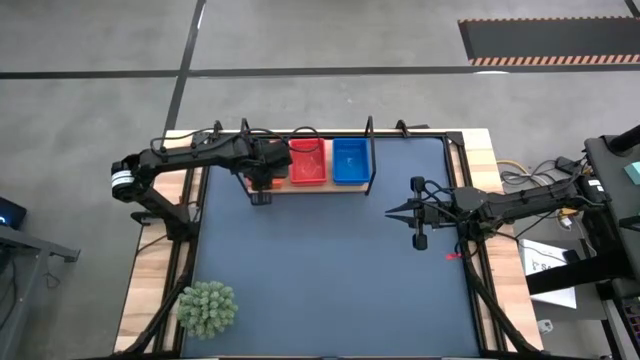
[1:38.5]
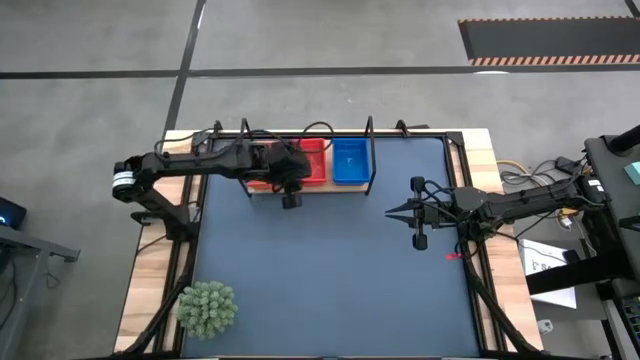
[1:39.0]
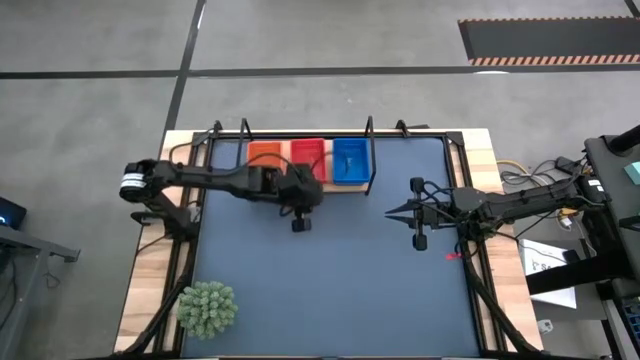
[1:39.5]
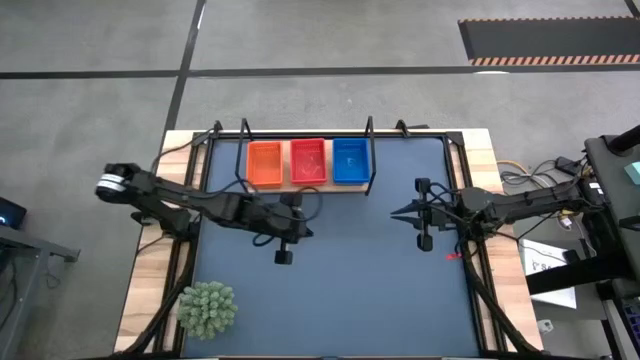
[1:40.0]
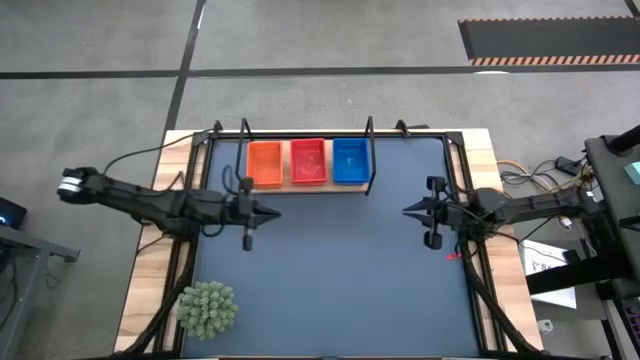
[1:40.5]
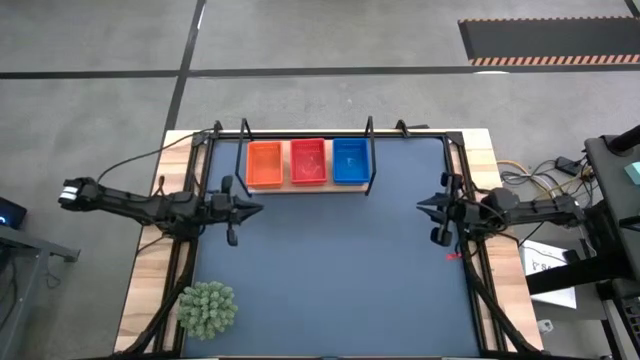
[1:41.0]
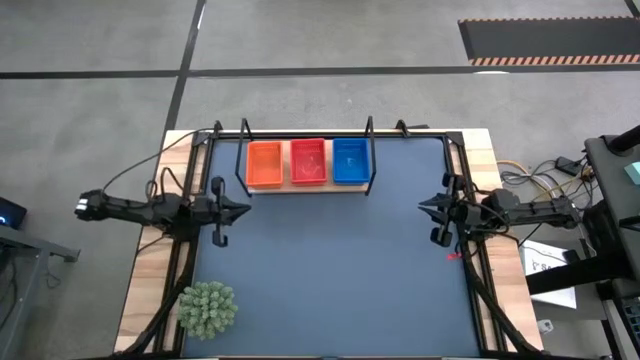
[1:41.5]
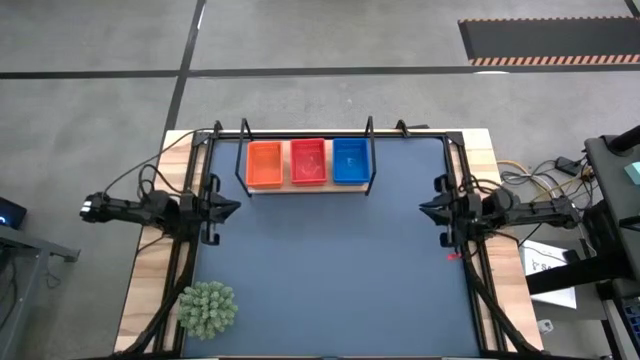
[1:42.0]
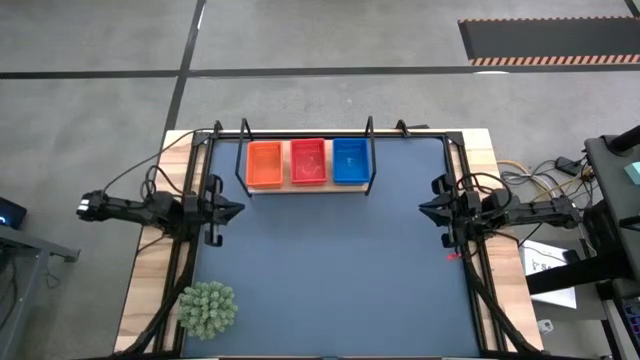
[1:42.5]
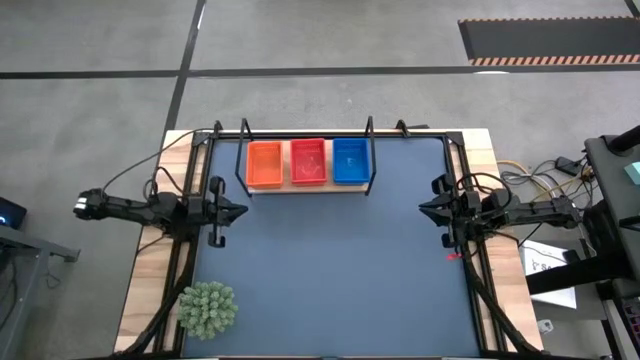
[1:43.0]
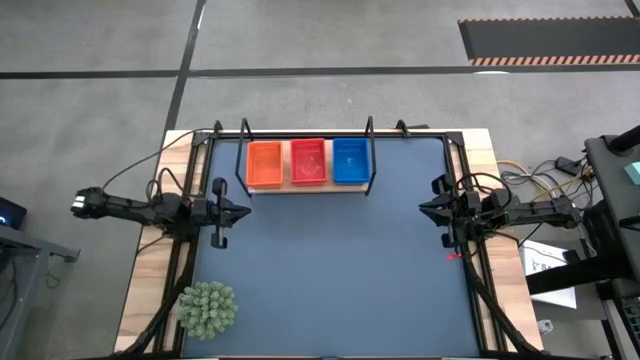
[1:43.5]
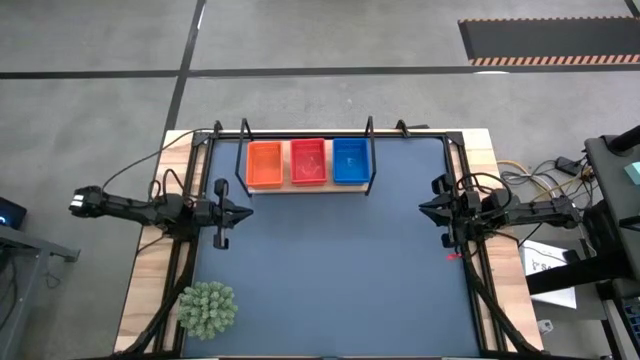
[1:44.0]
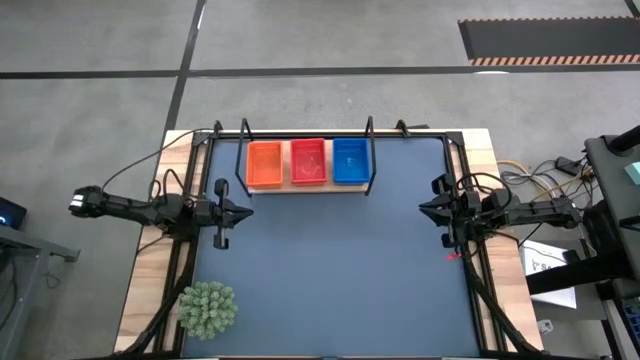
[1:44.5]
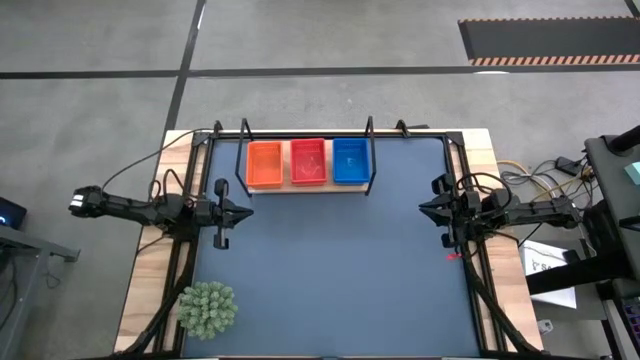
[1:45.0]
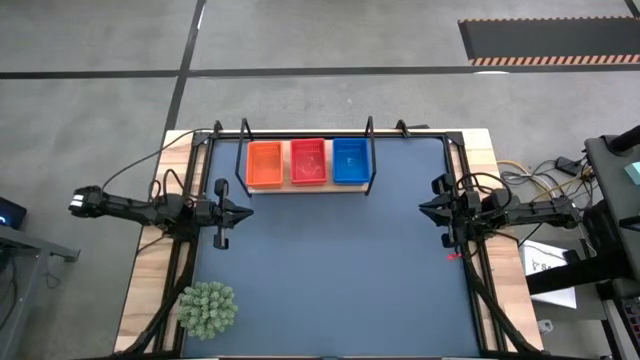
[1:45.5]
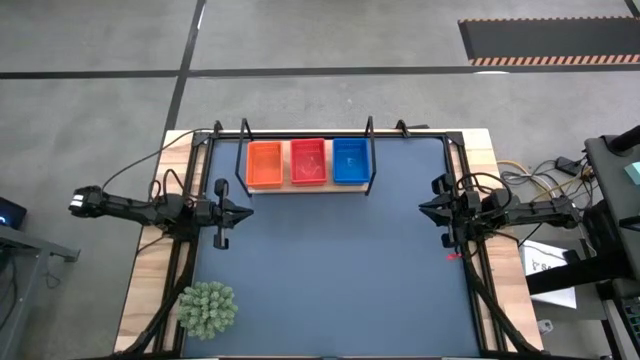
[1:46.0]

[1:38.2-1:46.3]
Task: Stack baskets on shelf by color
Return to Home Position

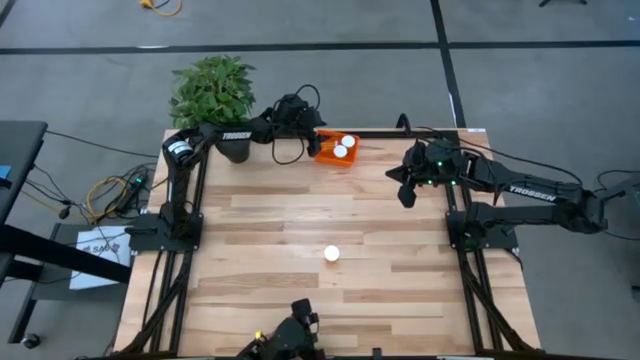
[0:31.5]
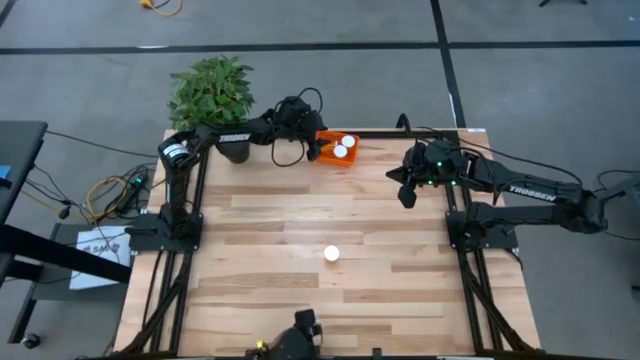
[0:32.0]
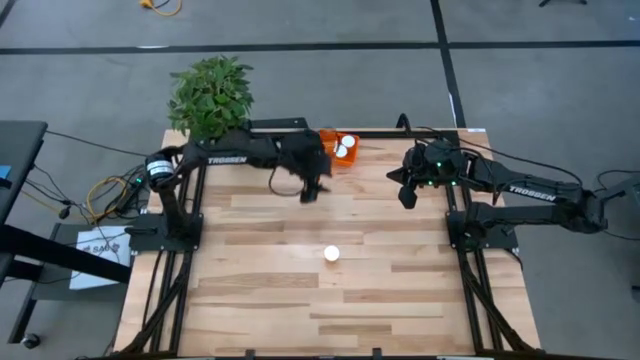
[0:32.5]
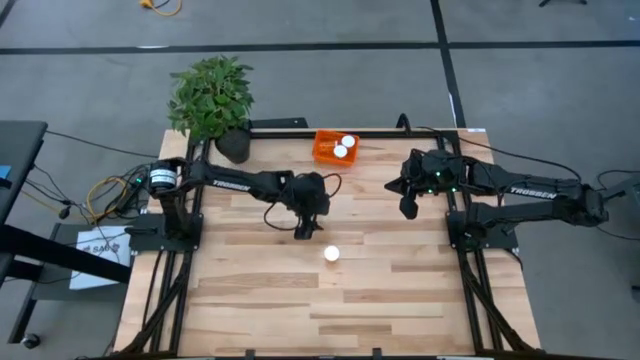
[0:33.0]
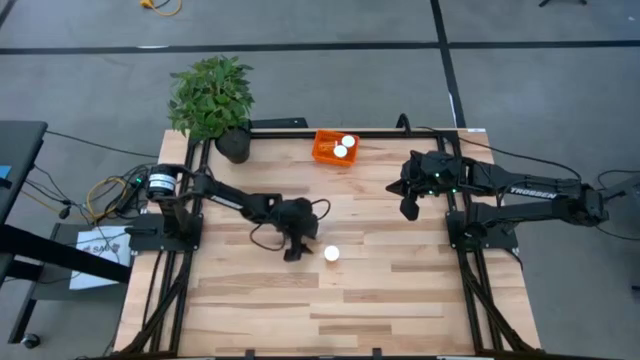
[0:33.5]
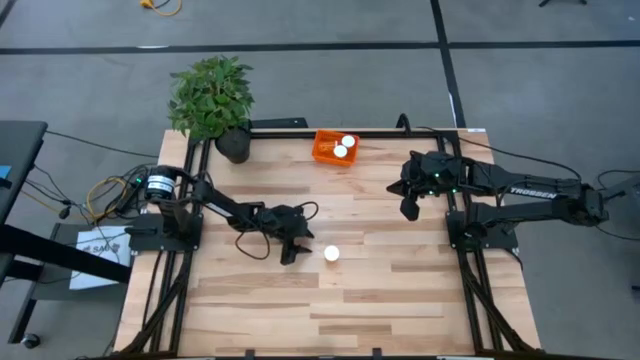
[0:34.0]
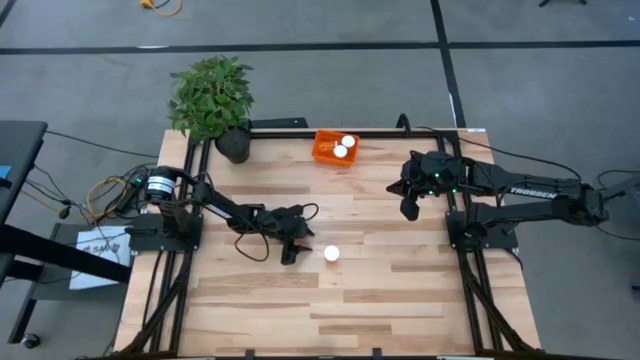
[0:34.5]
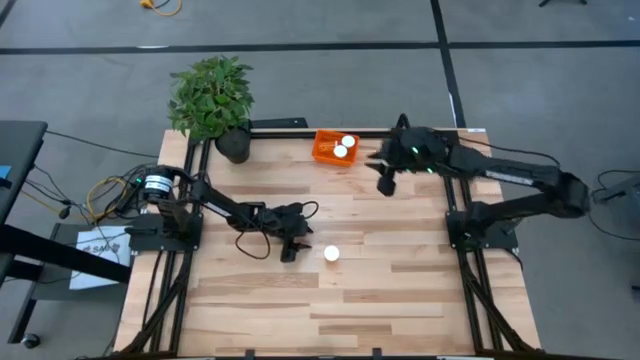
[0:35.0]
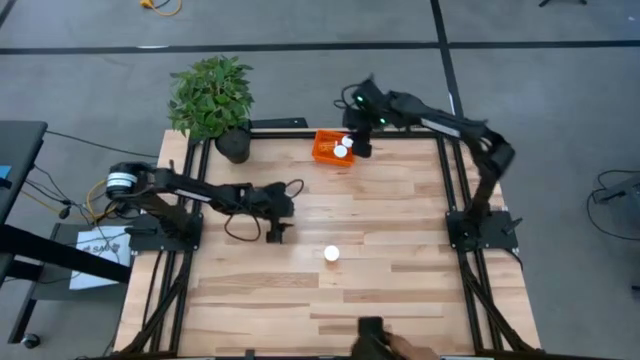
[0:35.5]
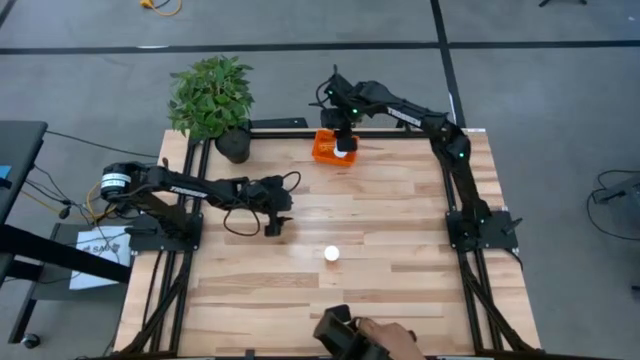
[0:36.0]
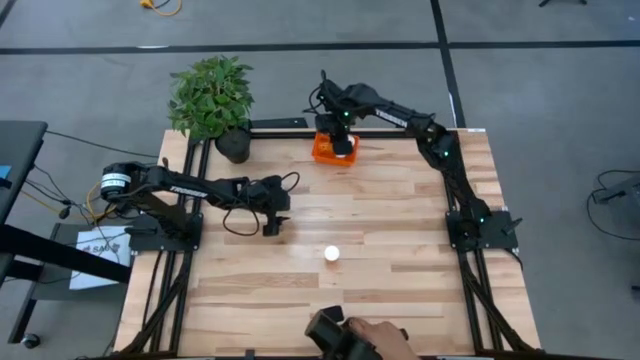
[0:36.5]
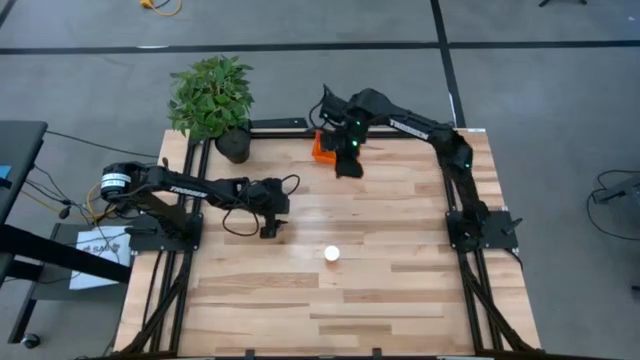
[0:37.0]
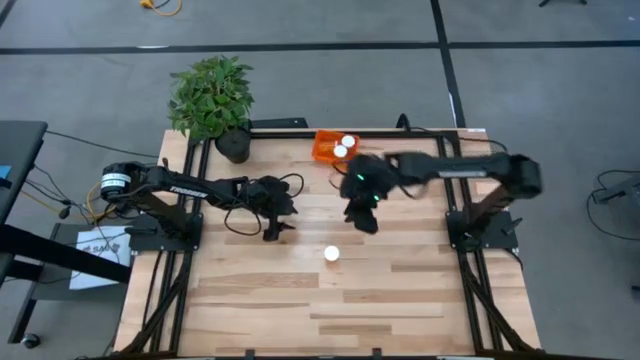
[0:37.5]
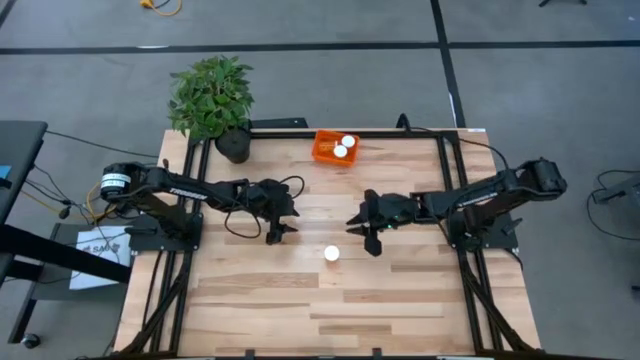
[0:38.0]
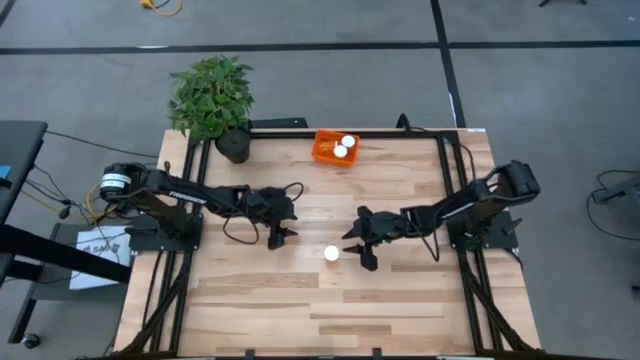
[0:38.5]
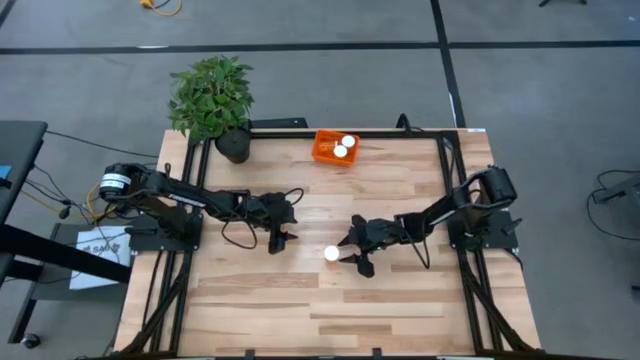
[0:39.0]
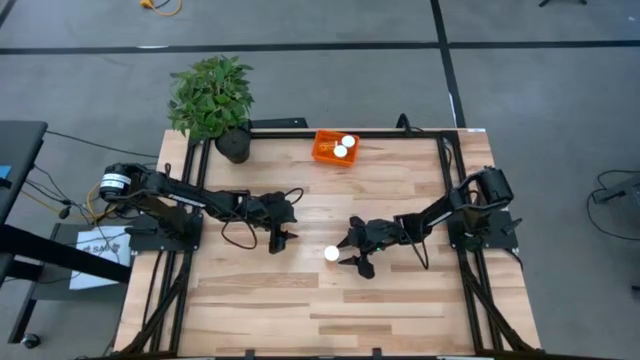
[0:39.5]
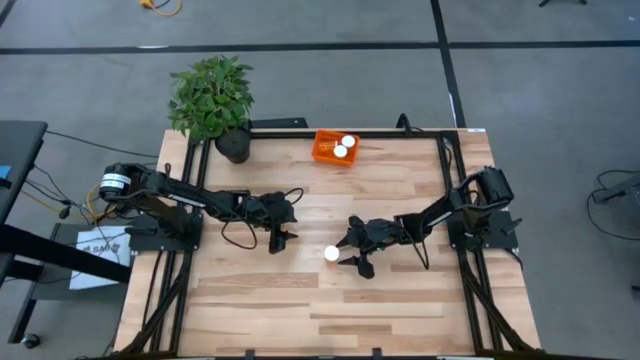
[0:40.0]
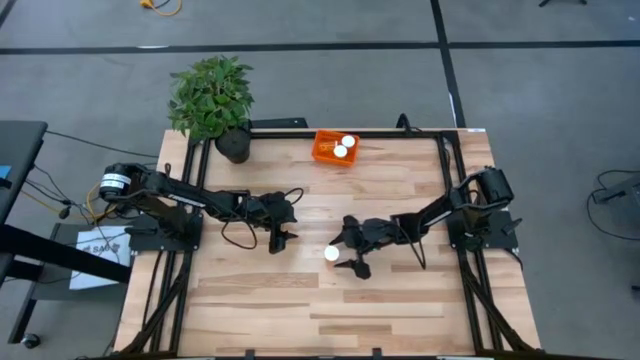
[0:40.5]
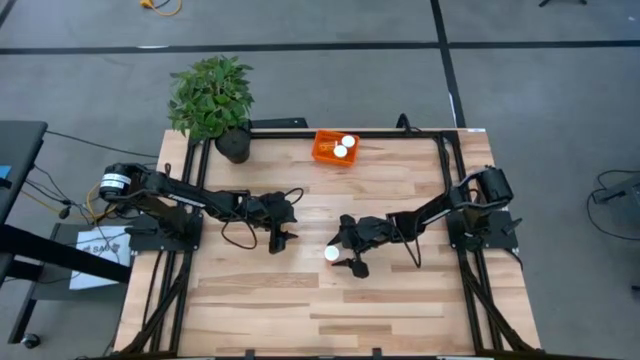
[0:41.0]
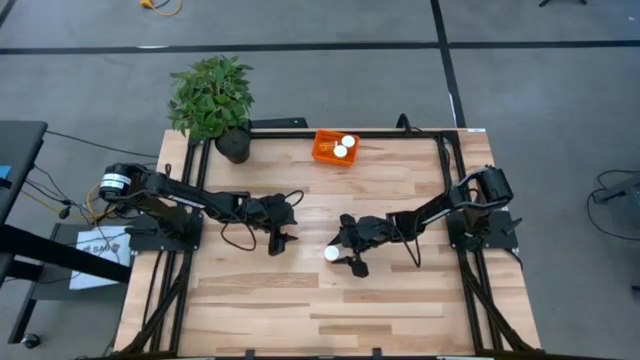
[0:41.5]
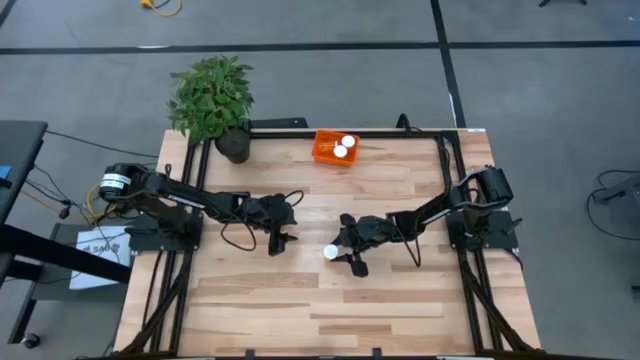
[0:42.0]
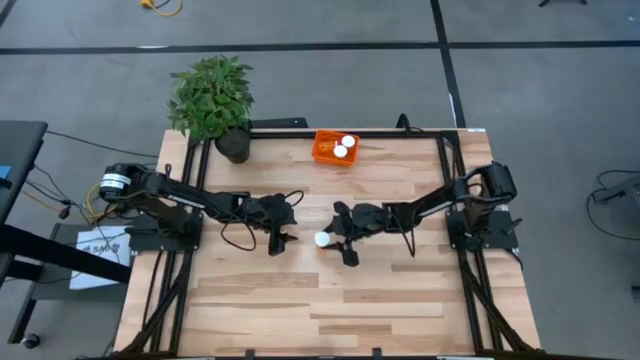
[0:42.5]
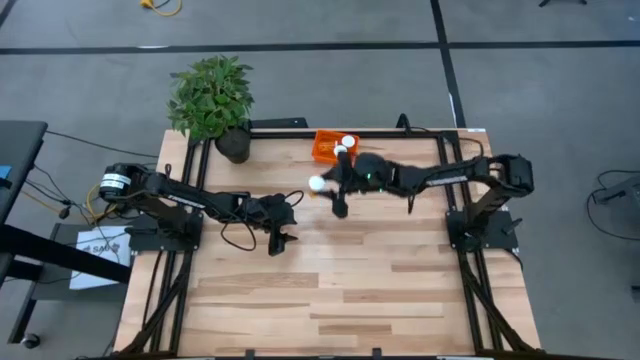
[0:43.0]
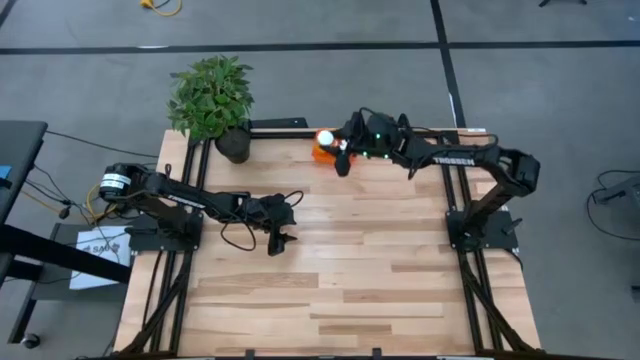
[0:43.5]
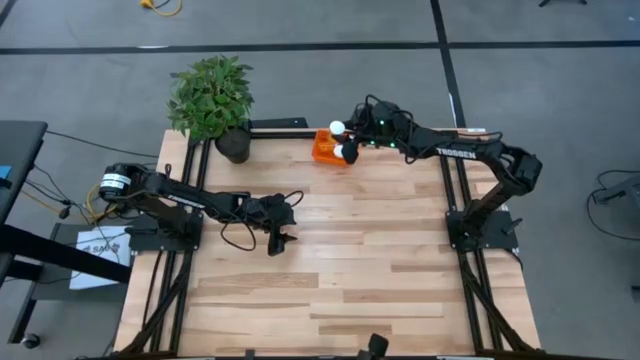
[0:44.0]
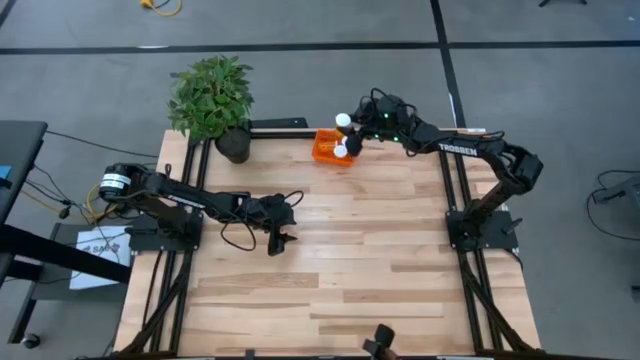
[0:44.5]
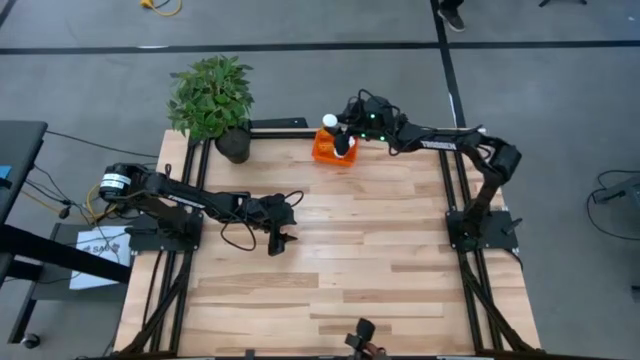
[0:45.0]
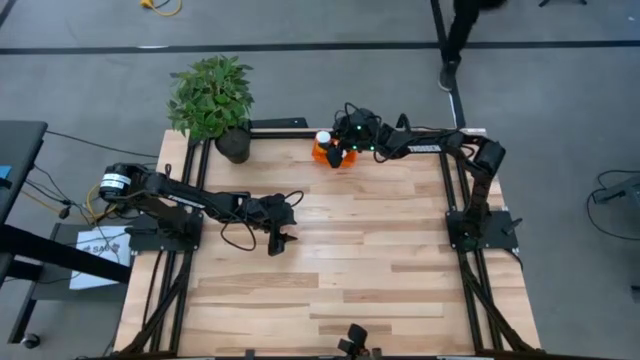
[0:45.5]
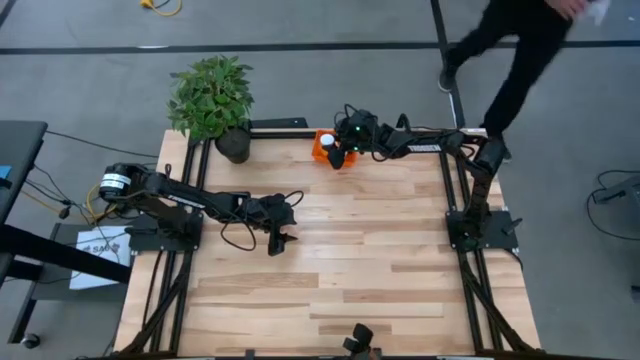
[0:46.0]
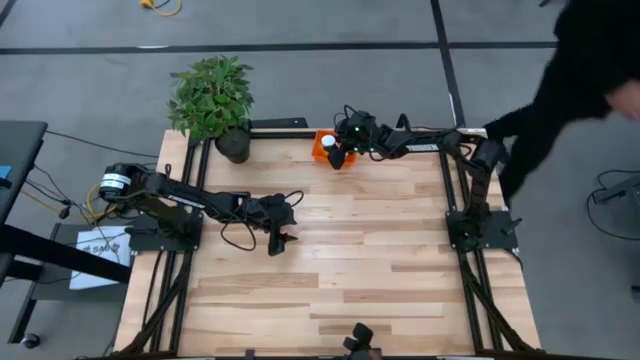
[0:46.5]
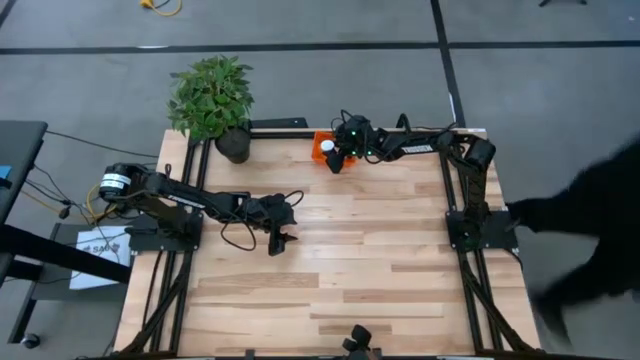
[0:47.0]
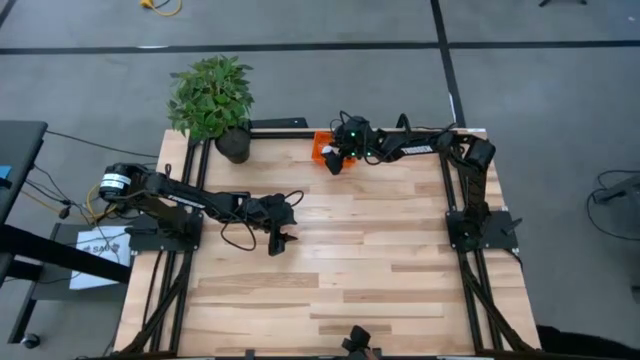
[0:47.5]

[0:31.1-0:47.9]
Task: Pick and place pill bottles into a basket
Put the orange medicine bottle into the orange bin
